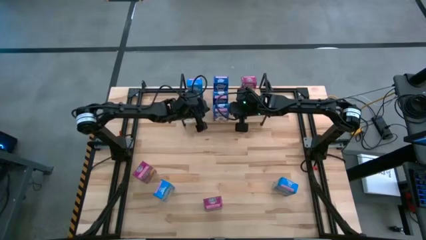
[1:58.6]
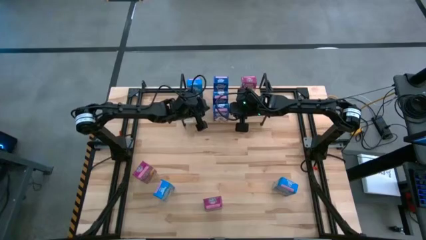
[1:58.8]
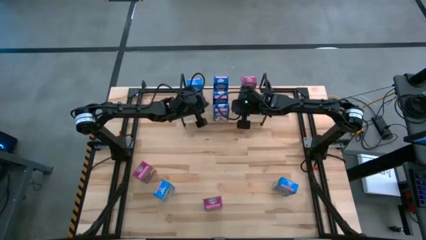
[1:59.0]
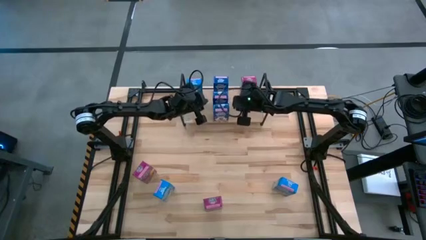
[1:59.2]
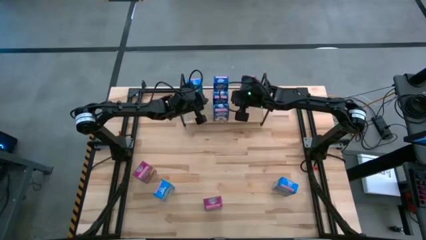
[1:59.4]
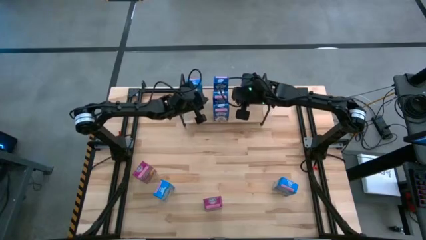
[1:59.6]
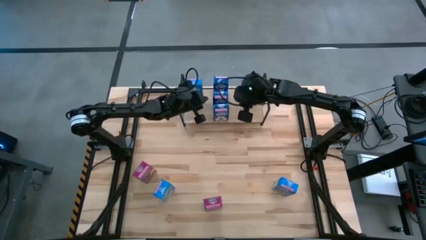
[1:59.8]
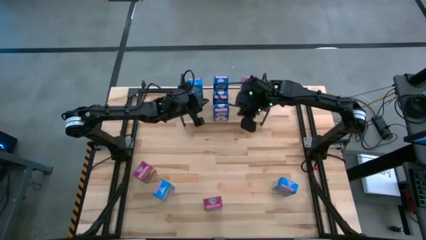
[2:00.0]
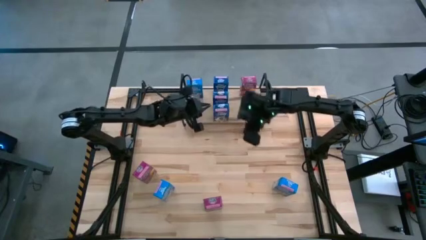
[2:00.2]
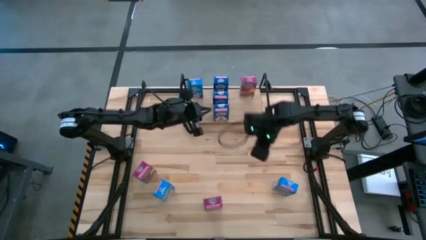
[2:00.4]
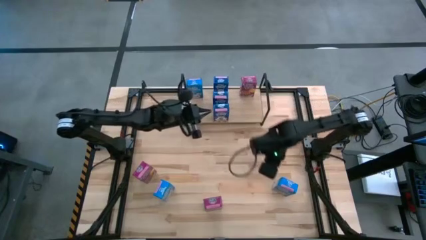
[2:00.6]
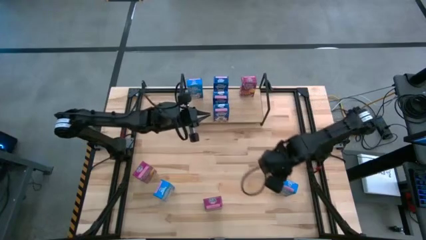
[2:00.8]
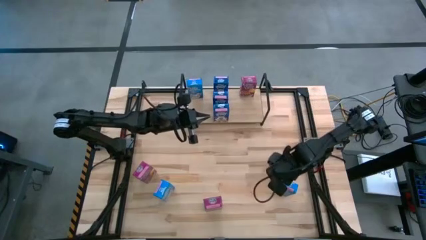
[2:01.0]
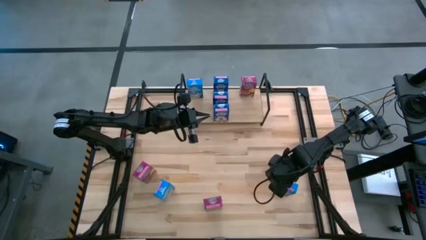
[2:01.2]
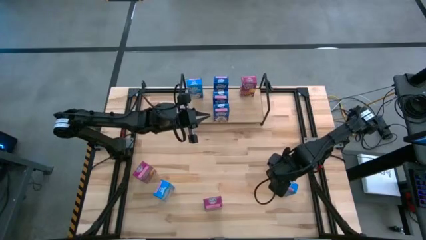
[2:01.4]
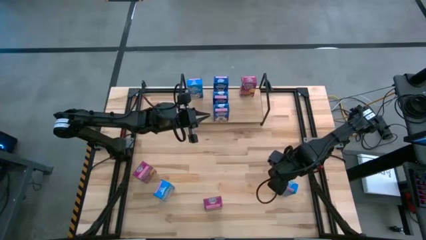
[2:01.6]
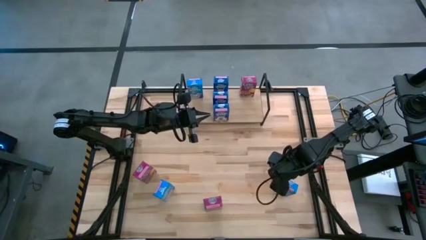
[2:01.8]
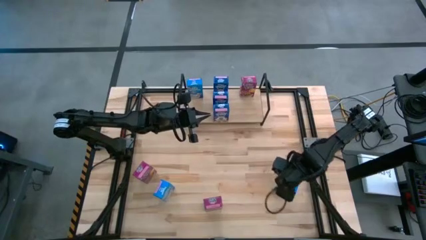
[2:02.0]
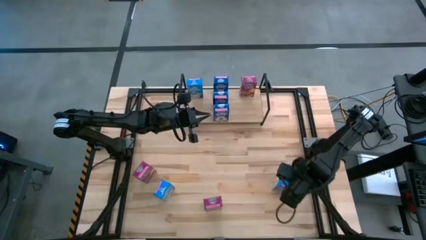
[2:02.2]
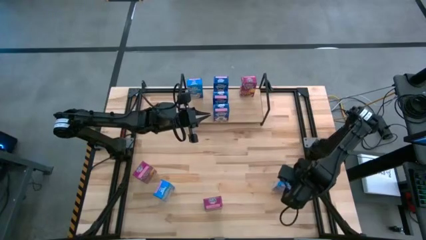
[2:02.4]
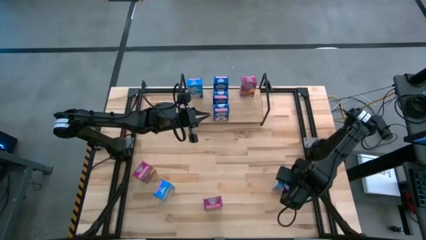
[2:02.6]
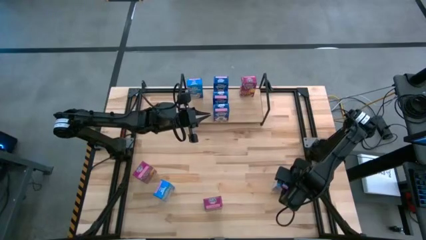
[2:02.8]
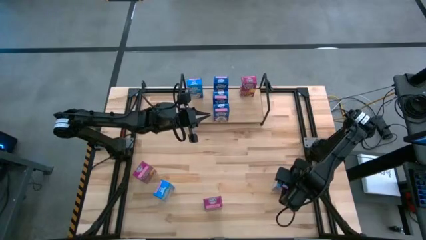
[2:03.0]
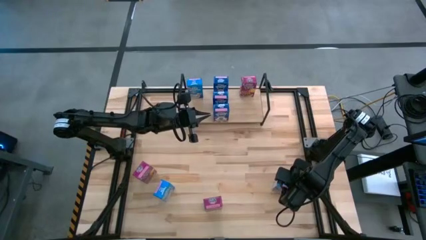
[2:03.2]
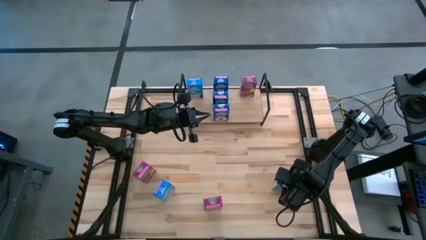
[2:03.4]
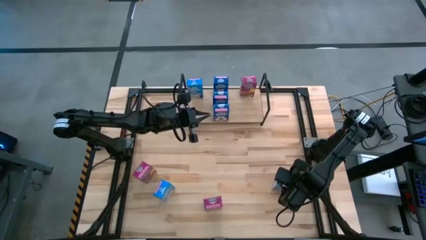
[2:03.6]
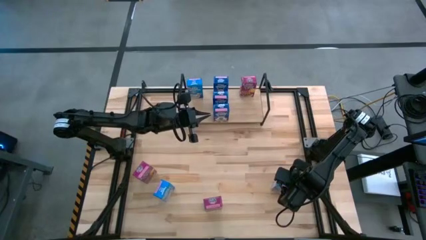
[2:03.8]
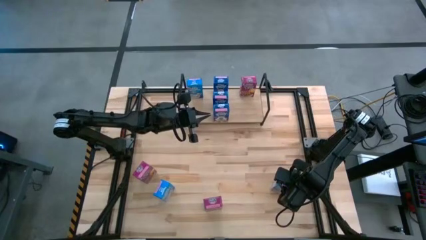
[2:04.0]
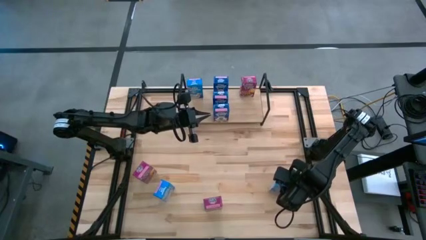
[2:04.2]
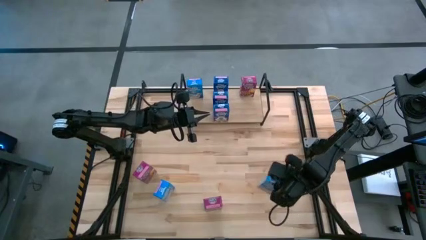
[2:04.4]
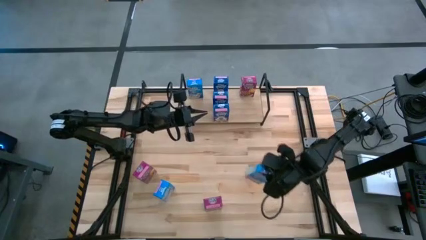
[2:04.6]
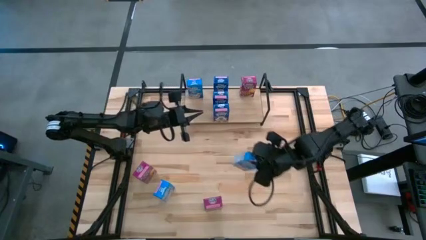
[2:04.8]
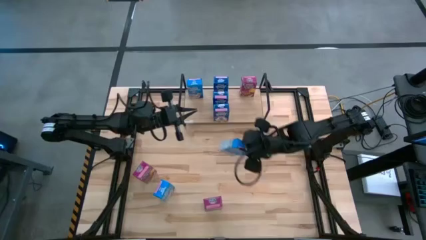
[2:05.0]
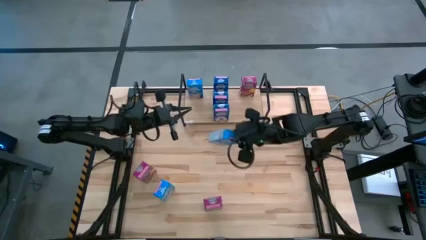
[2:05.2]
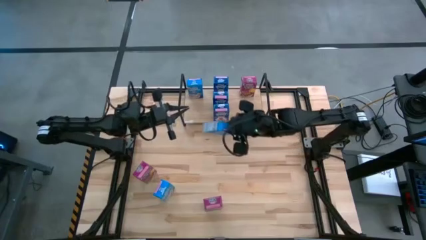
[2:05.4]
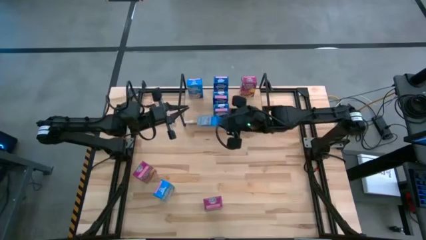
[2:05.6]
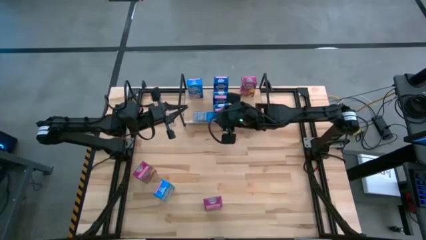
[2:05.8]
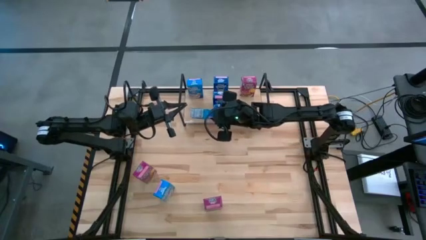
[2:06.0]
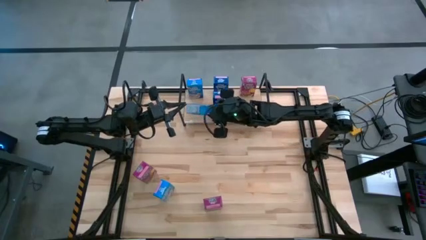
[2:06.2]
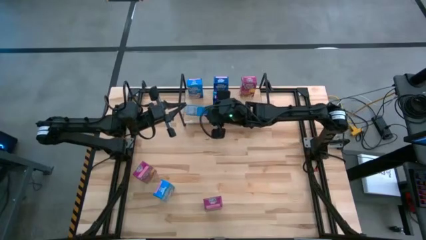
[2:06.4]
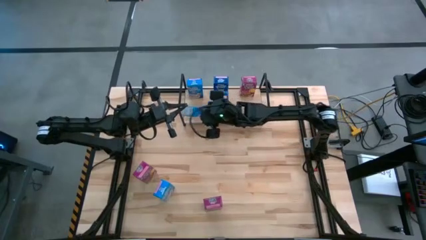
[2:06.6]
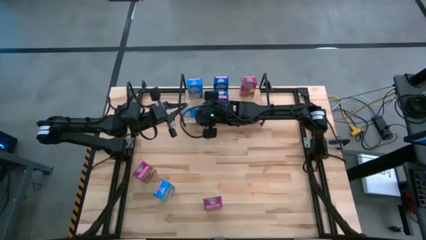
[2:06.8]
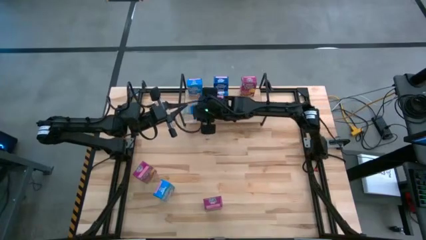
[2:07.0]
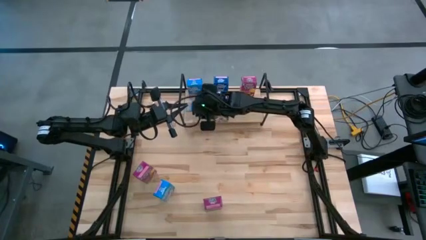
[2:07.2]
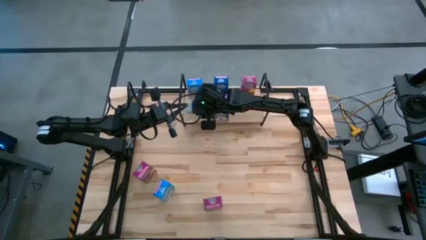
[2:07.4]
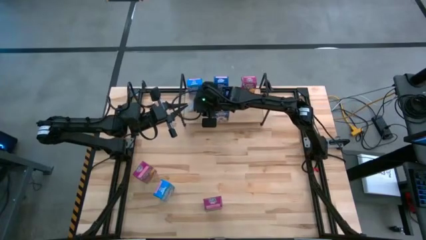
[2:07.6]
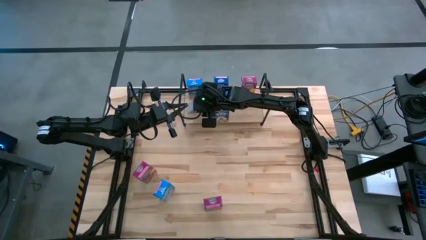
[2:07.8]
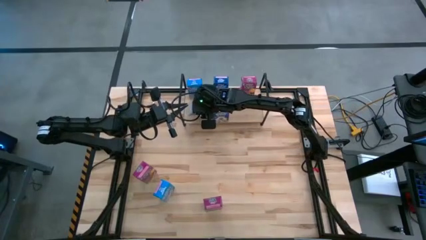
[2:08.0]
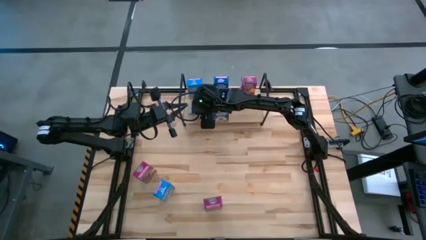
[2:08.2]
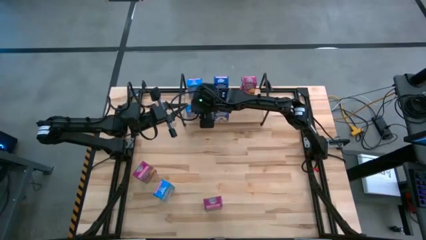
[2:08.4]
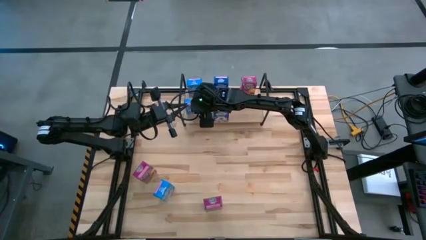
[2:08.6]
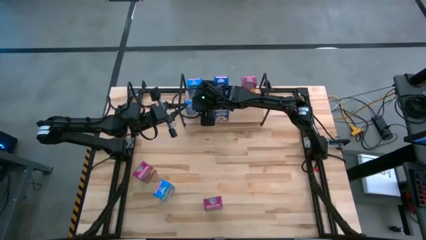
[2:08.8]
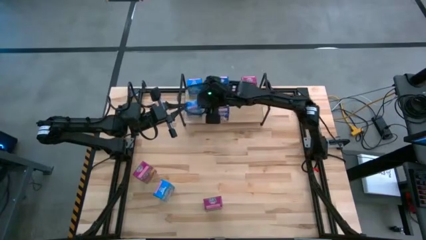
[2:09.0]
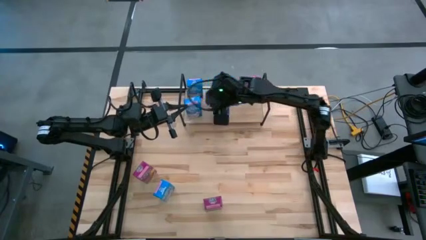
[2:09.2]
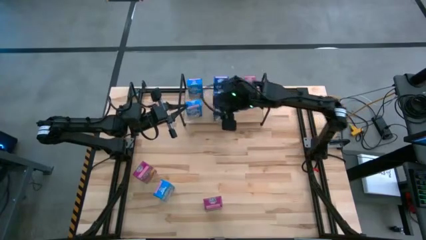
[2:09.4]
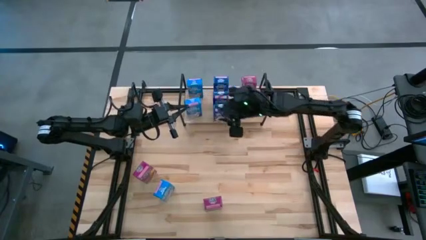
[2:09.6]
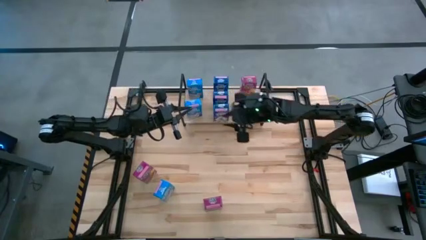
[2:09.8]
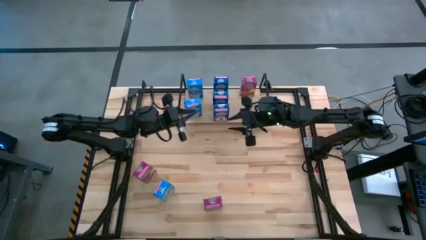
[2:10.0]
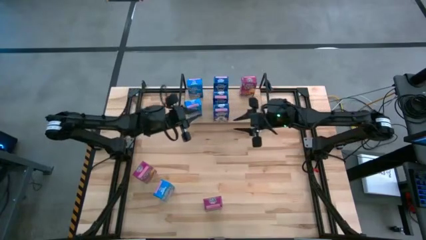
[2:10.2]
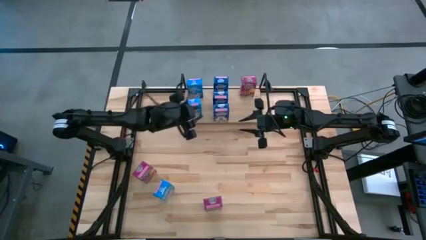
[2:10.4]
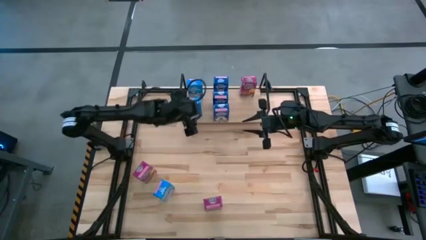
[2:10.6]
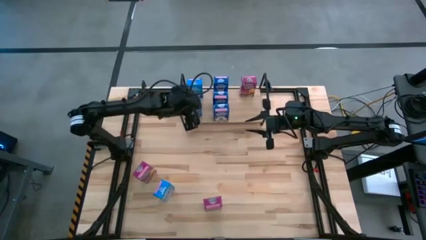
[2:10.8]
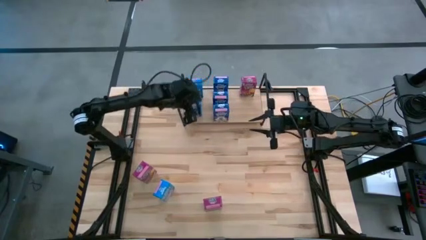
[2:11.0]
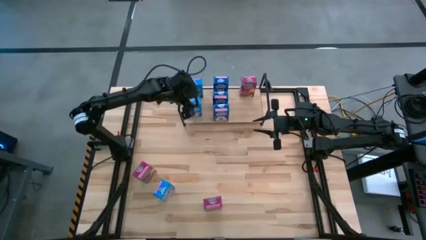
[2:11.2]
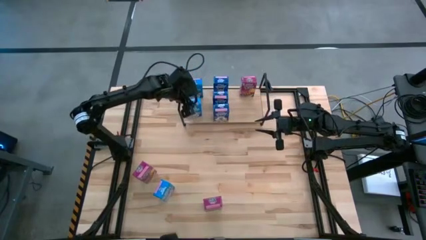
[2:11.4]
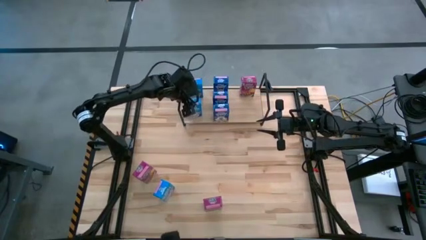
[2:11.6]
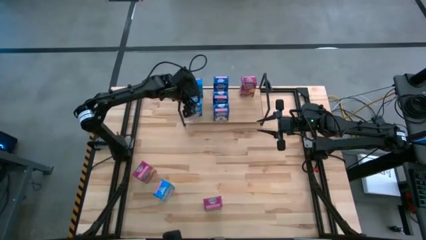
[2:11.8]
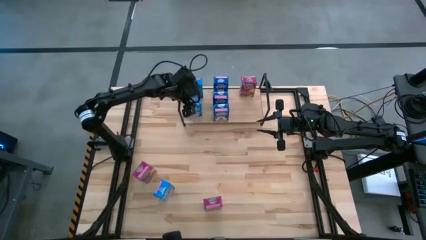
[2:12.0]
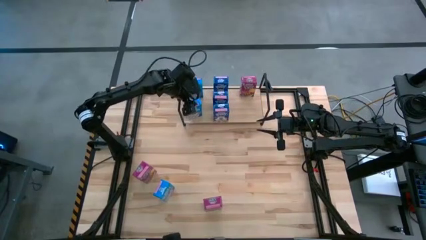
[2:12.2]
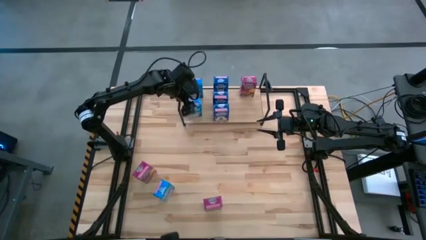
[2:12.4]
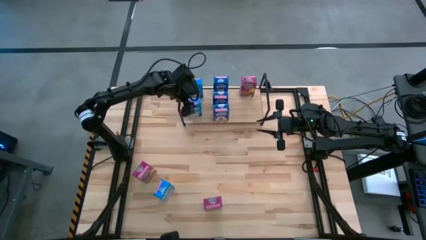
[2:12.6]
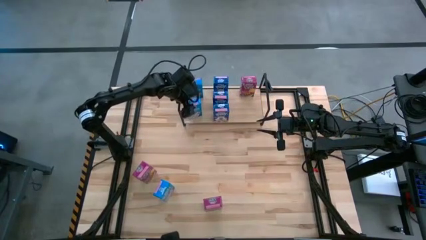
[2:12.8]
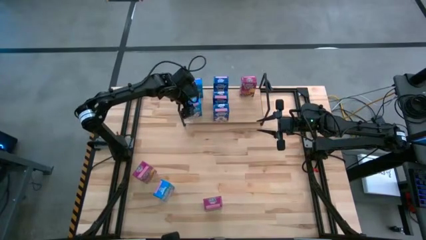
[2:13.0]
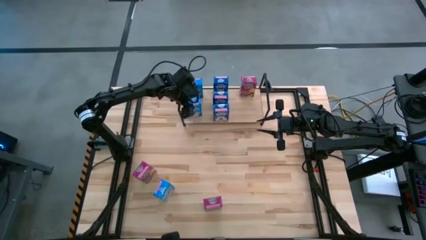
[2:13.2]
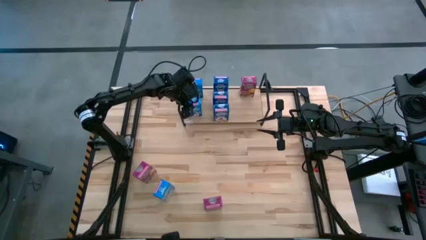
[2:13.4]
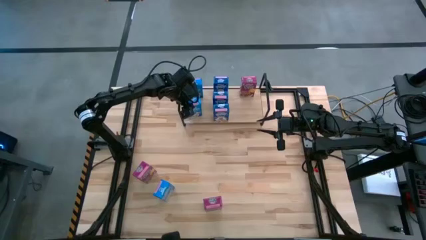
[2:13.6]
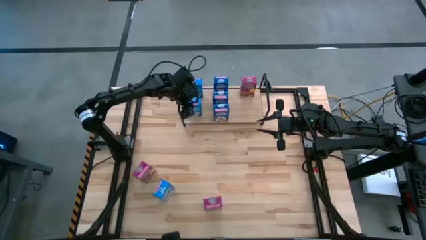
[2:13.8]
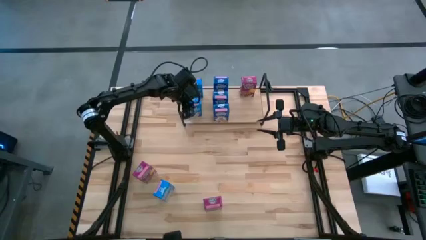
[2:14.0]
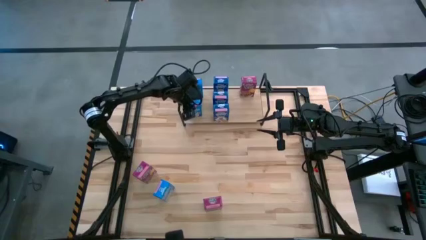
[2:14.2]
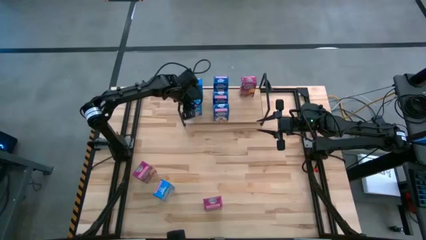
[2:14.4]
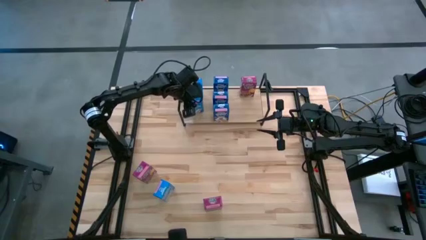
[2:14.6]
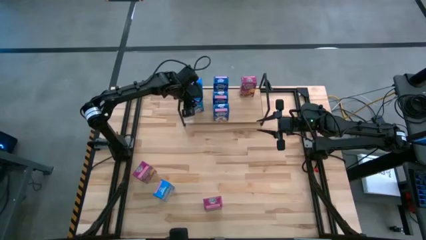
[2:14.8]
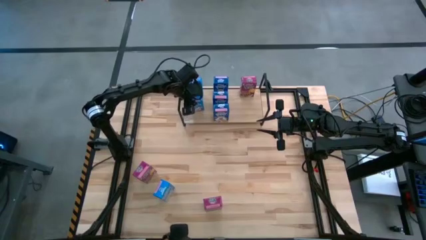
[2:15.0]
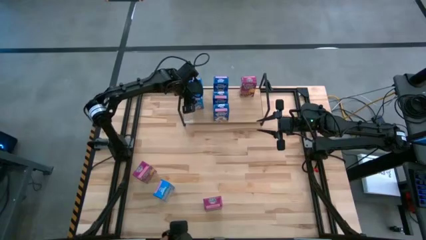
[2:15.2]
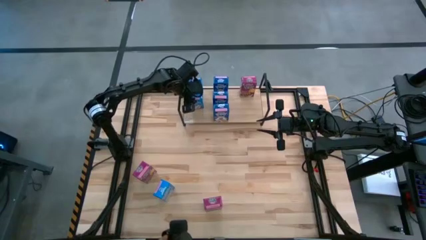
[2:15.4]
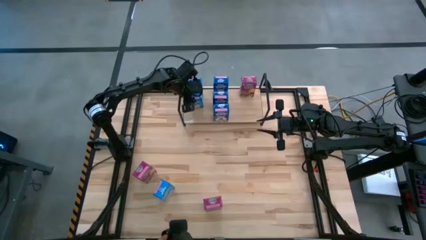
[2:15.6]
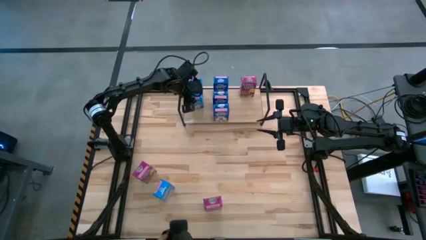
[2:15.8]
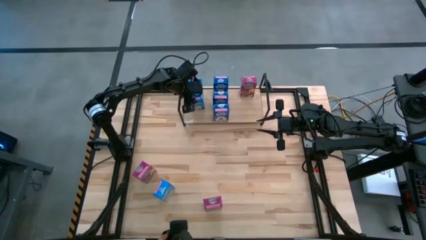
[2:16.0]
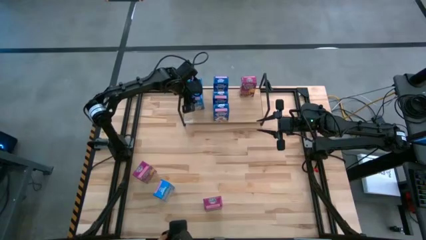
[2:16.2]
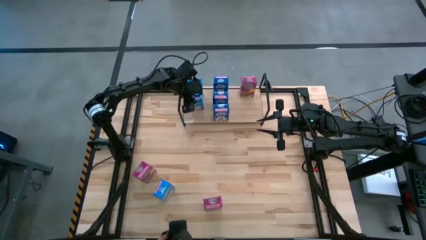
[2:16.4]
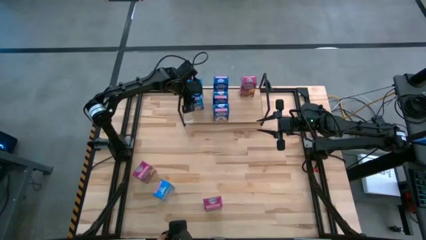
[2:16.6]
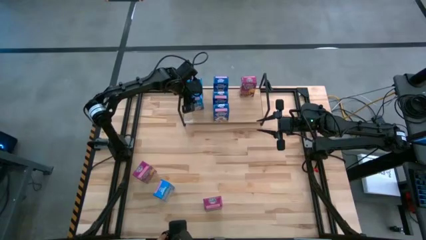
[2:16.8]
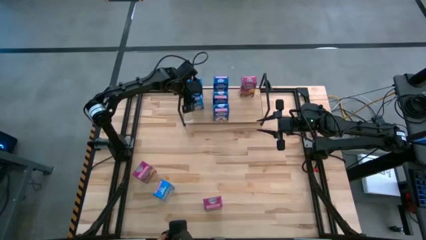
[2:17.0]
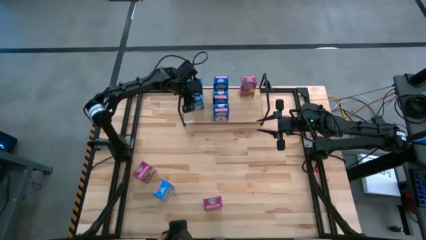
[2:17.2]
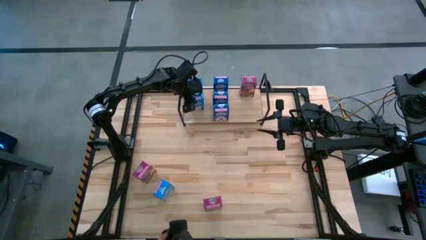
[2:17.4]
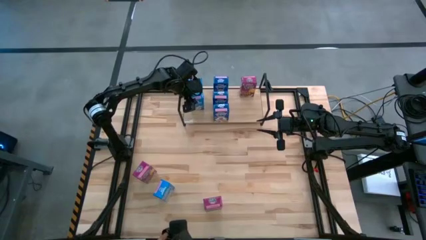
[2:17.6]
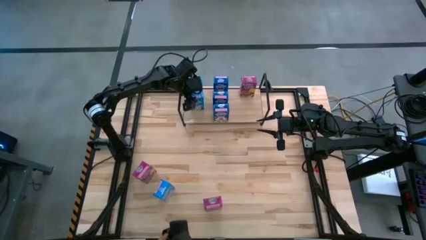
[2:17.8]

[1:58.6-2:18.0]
Task: Stack cereal on shelf
Put the right blue cereal box on the shelf aligned with the other blue cereal box
